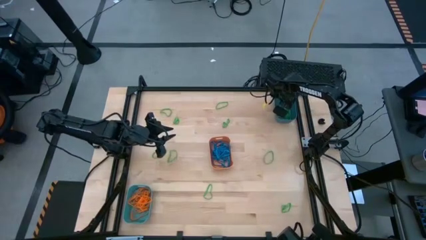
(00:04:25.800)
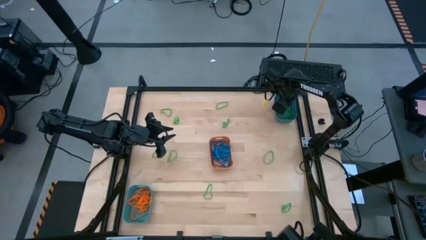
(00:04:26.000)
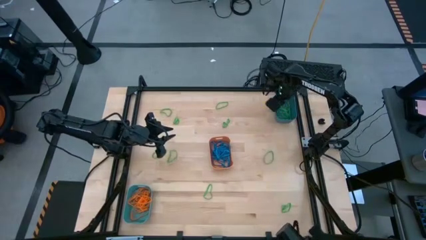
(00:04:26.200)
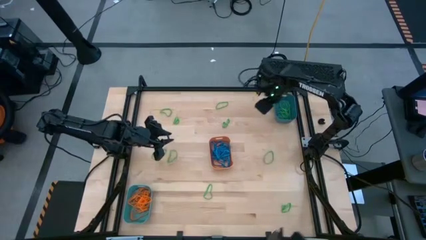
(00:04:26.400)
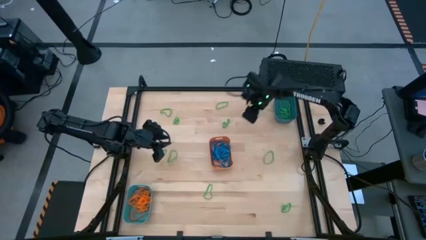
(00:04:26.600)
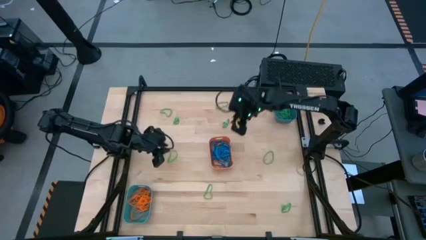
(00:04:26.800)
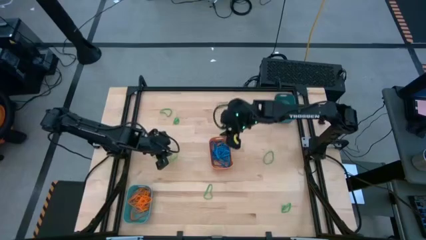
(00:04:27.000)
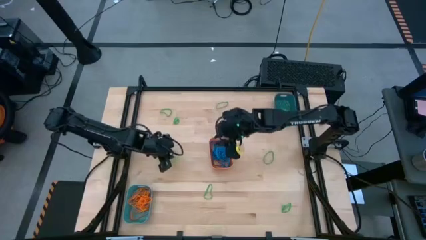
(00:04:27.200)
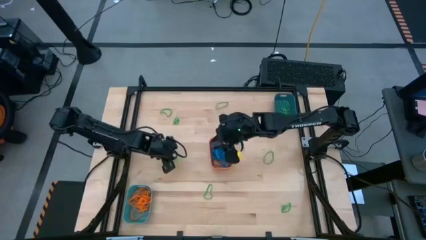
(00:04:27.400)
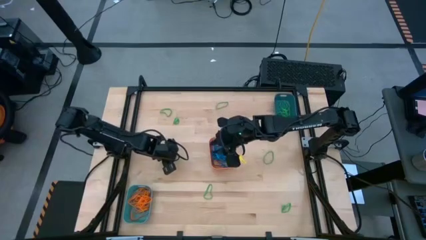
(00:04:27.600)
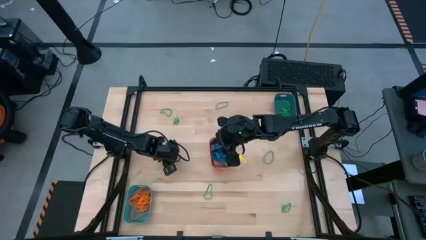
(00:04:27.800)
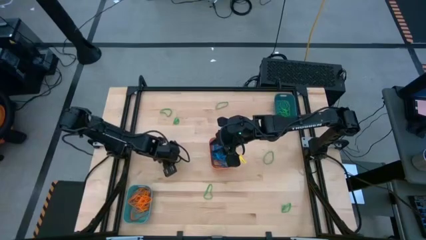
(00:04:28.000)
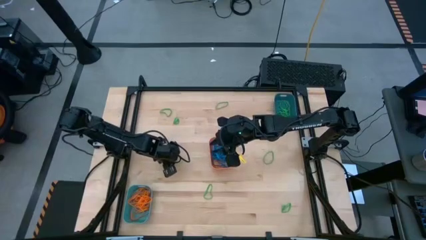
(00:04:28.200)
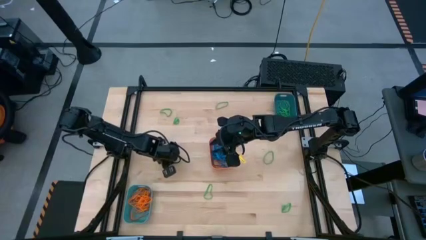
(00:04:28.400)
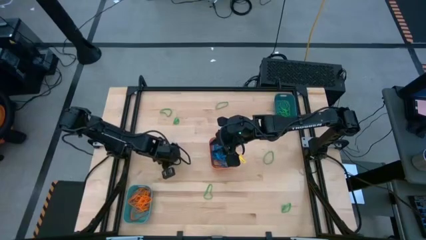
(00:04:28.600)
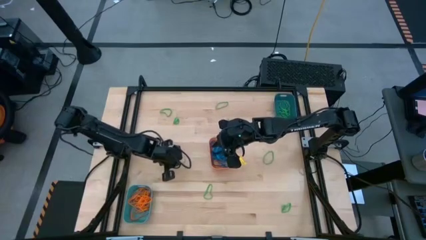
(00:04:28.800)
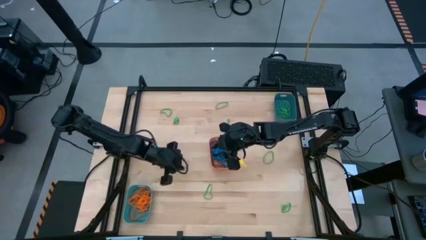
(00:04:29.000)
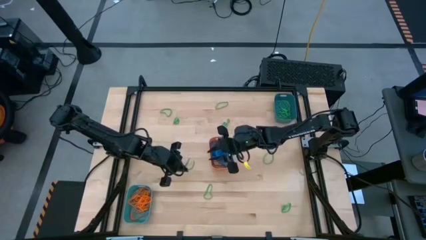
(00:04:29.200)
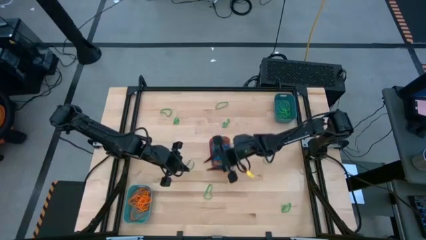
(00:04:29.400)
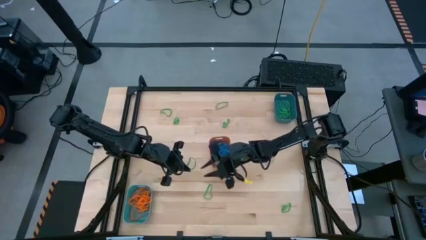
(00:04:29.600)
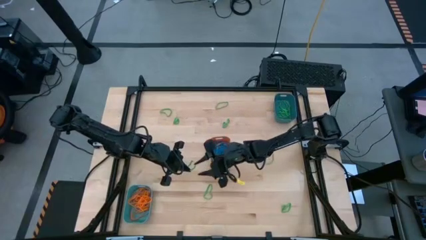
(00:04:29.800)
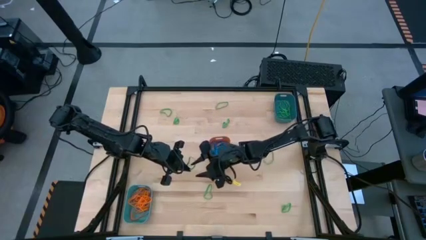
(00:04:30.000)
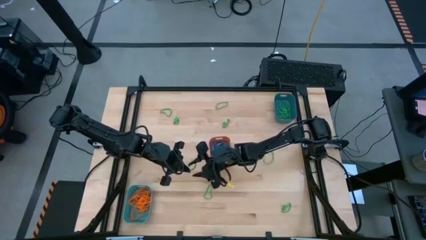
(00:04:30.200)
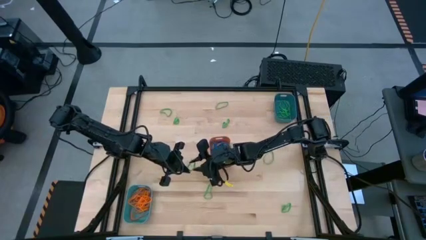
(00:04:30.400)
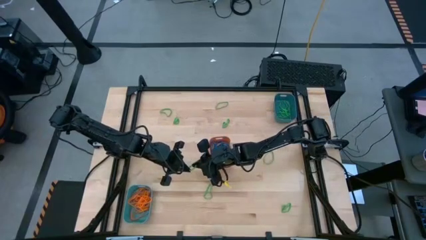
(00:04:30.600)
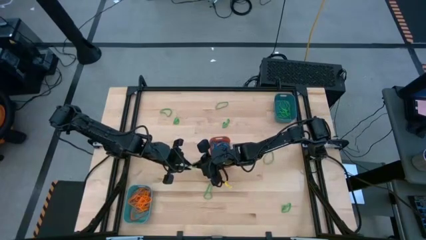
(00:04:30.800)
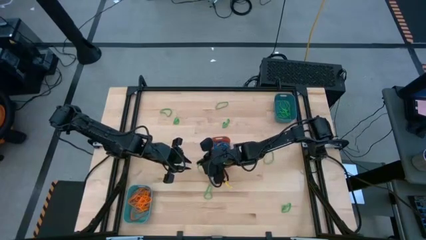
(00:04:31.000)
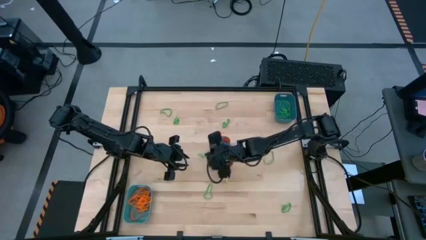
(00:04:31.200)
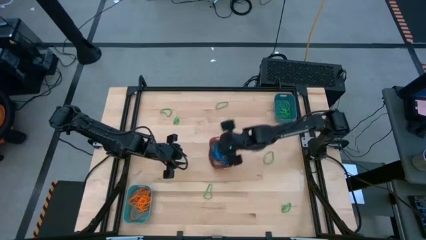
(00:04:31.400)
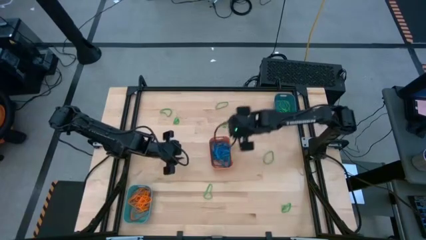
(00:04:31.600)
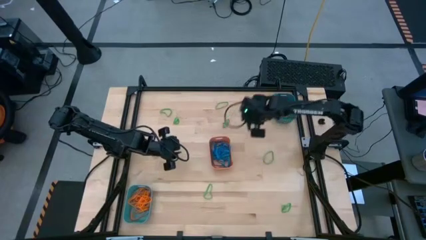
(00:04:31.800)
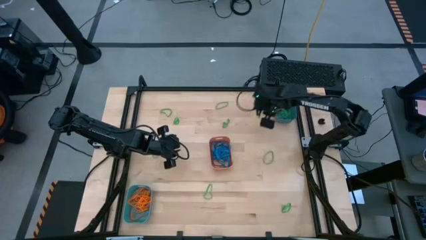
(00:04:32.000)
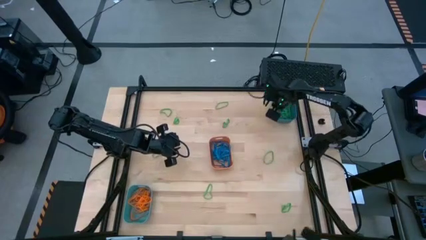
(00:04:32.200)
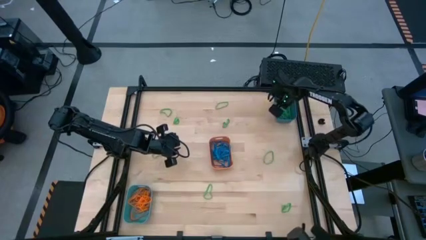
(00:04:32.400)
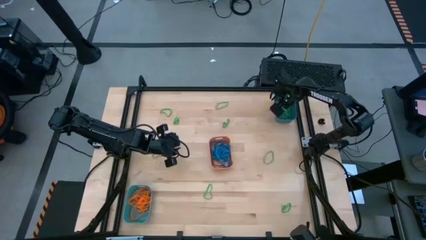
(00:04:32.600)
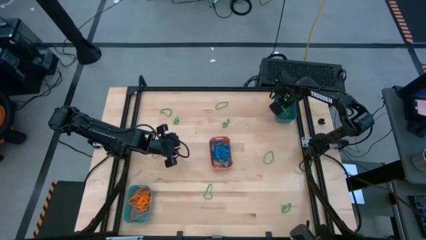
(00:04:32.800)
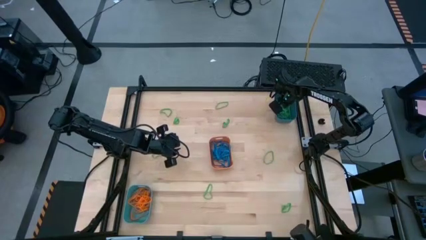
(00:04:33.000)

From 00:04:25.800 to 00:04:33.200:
Task: Sort rubber bands into baskets
Put the green rubber band into the blue bin

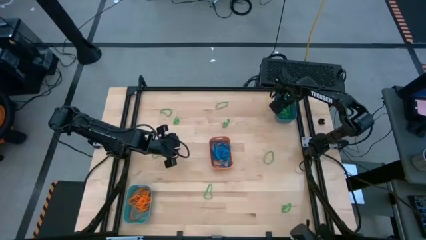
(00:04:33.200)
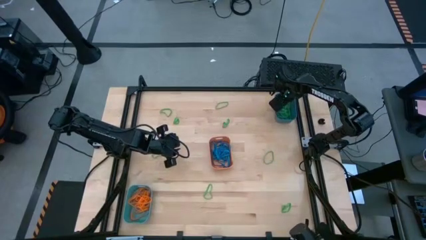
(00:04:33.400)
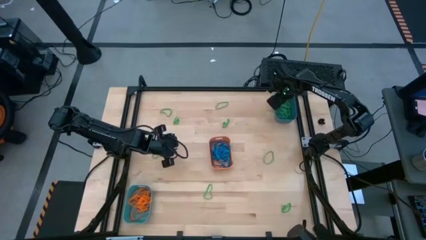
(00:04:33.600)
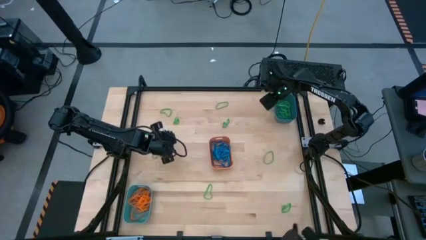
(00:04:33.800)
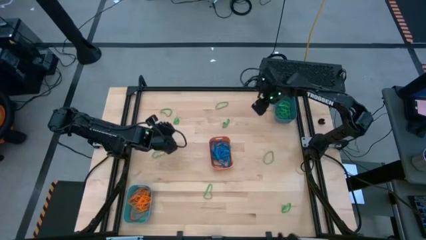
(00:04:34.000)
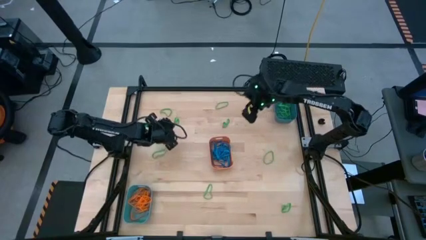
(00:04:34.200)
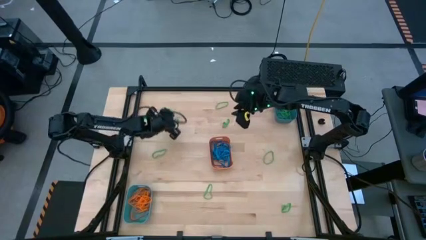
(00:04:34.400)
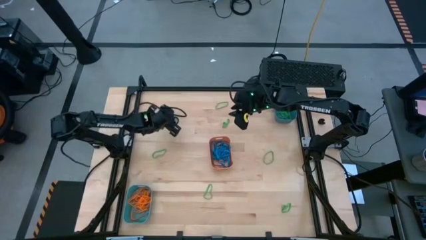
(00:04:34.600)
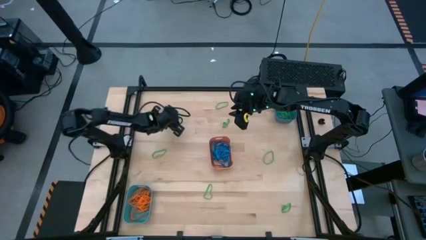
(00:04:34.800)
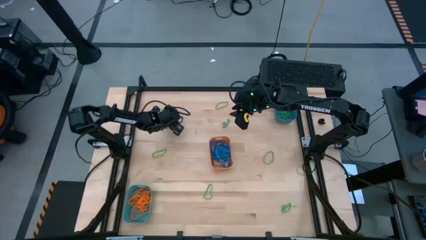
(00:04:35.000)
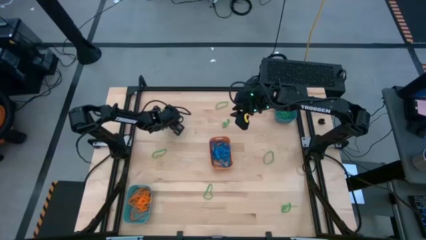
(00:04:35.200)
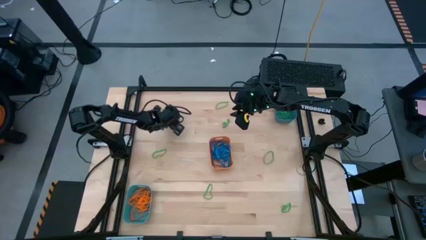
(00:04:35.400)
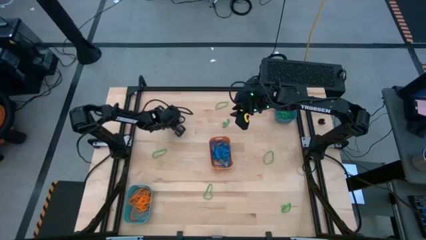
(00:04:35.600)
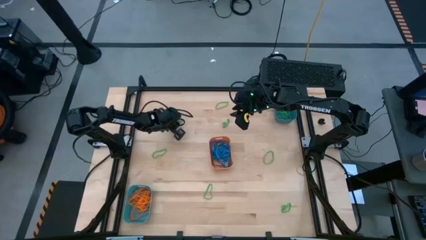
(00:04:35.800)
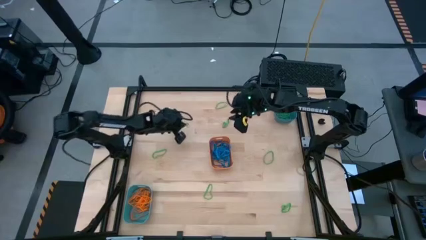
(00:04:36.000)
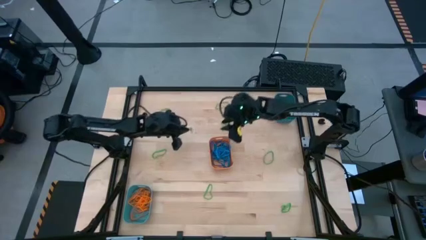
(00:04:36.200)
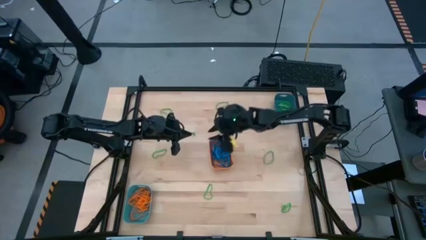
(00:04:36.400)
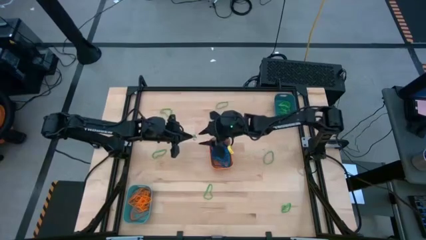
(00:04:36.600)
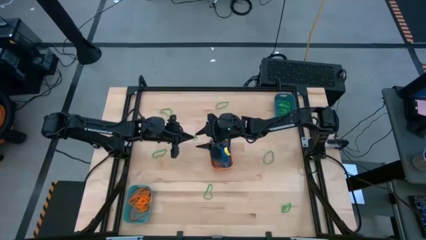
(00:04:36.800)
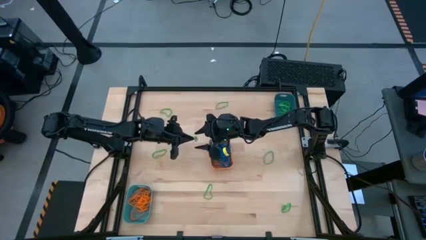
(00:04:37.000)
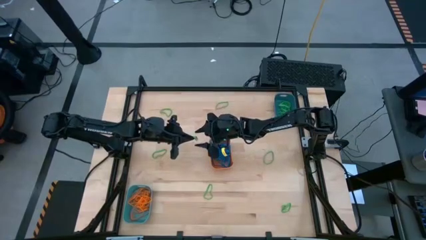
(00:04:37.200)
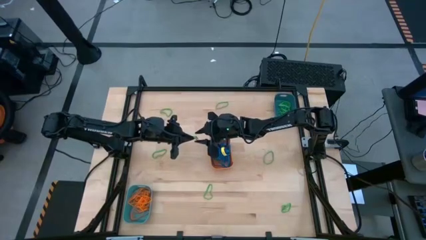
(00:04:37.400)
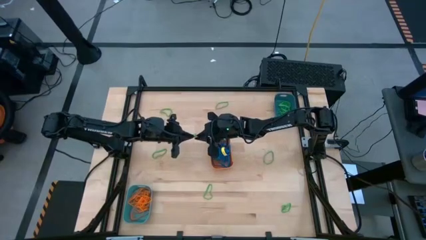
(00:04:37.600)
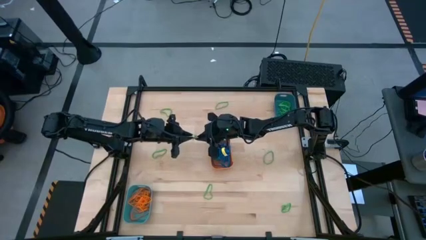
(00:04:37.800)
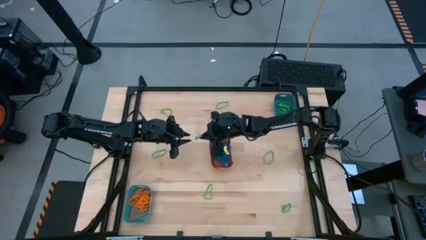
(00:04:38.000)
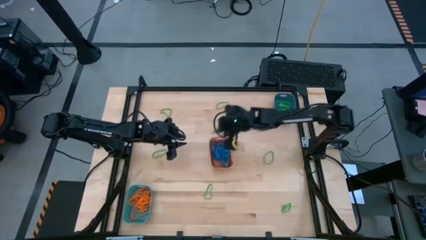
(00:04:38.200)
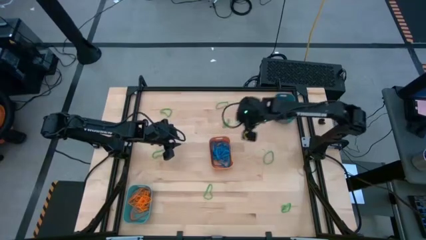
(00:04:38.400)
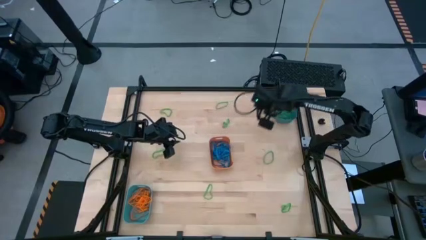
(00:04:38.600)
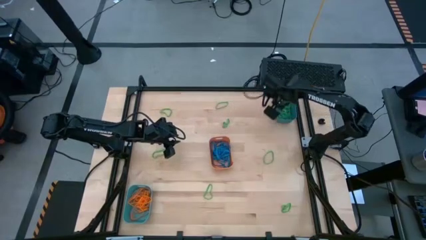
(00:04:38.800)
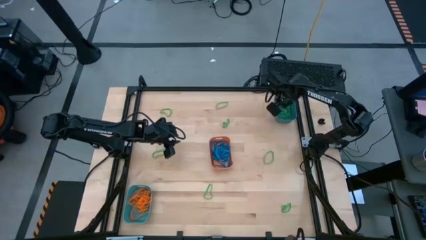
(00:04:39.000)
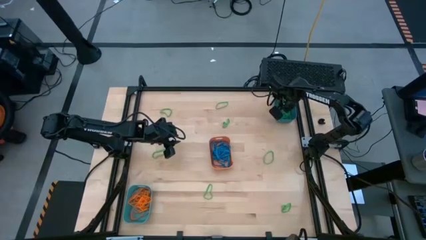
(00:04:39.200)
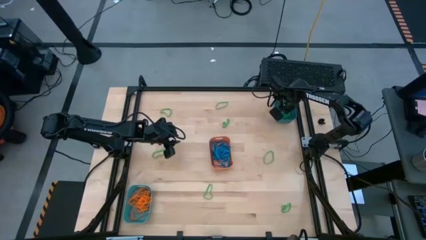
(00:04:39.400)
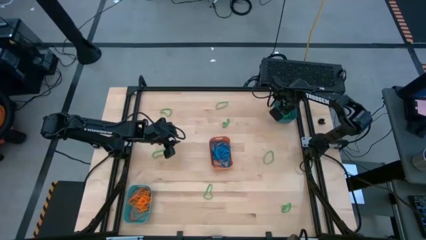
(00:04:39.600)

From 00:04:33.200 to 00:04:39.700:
Put the green rubber band into the blue bin
